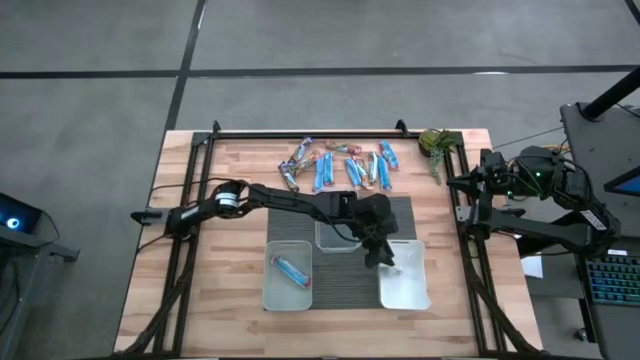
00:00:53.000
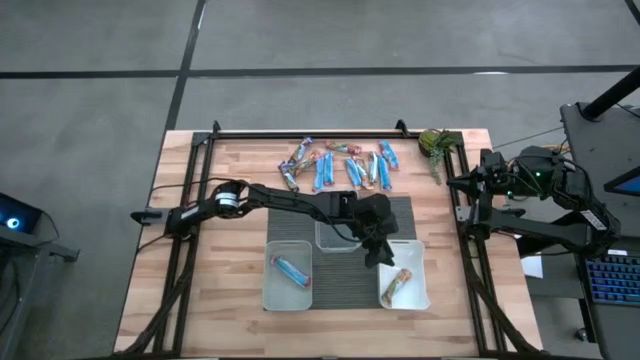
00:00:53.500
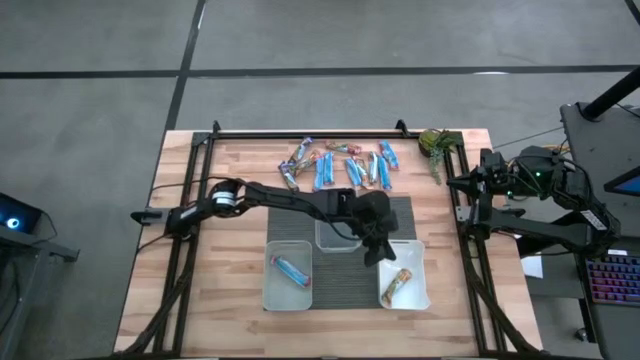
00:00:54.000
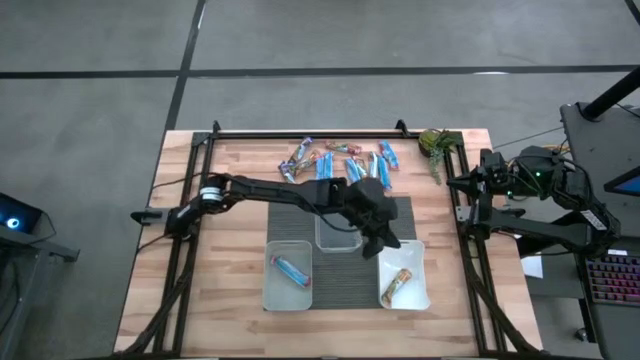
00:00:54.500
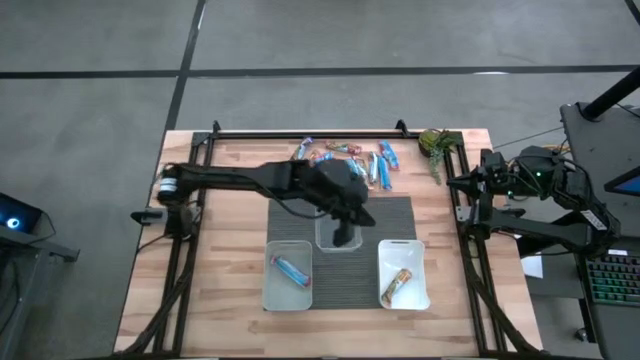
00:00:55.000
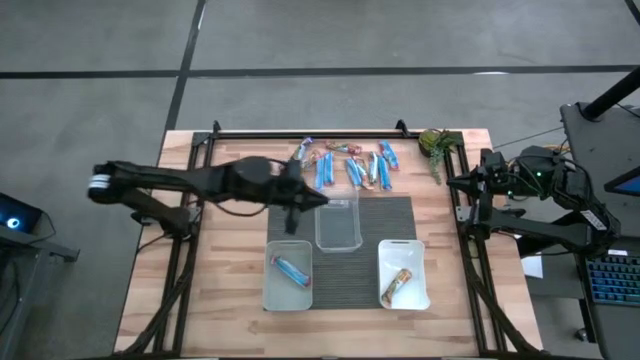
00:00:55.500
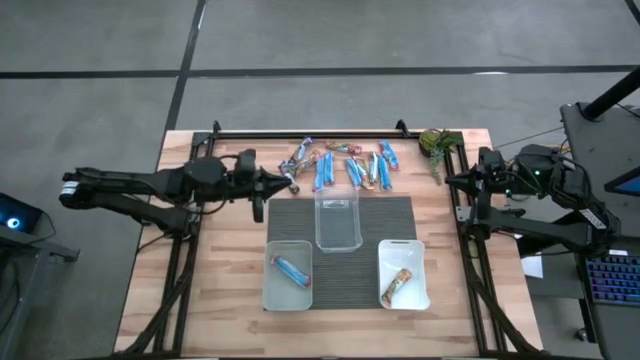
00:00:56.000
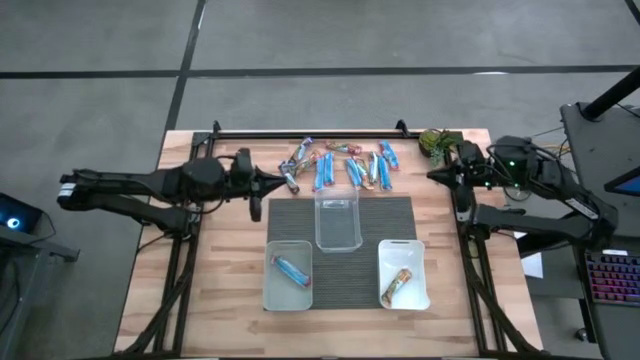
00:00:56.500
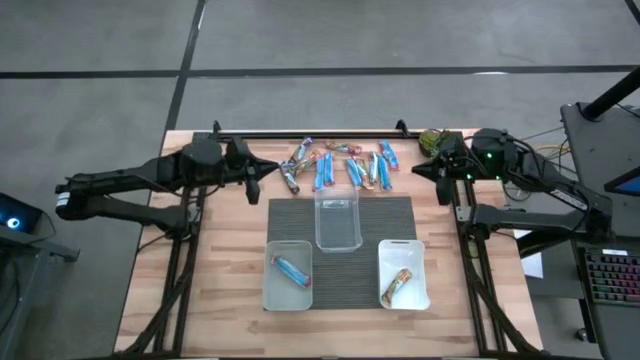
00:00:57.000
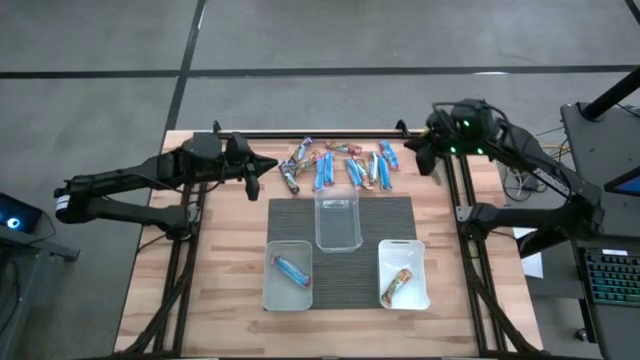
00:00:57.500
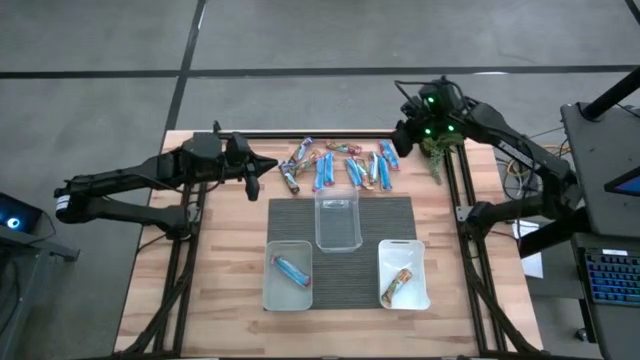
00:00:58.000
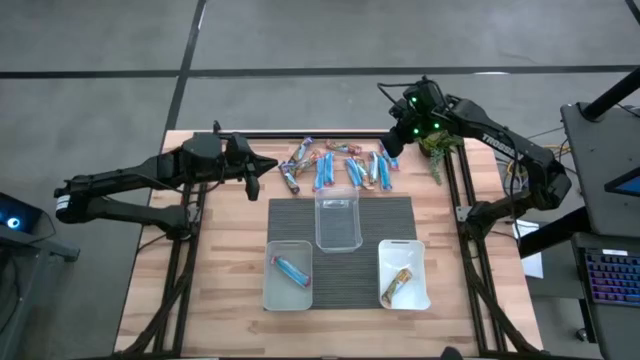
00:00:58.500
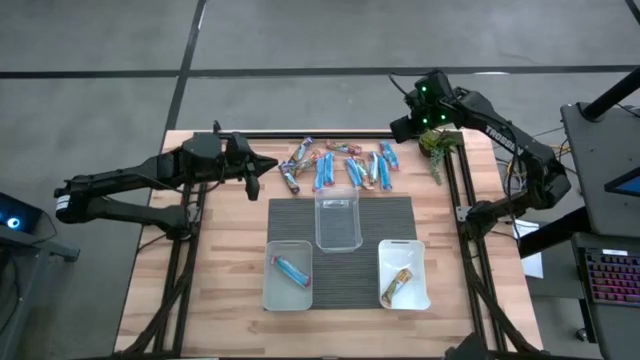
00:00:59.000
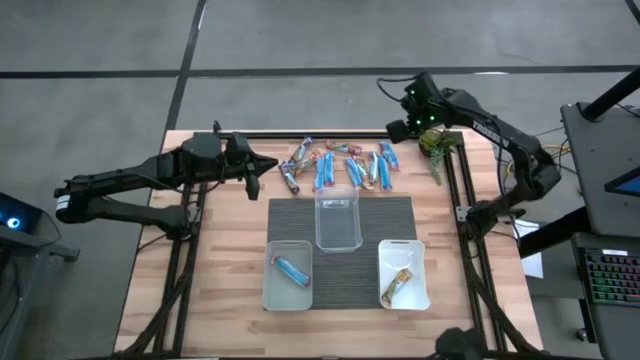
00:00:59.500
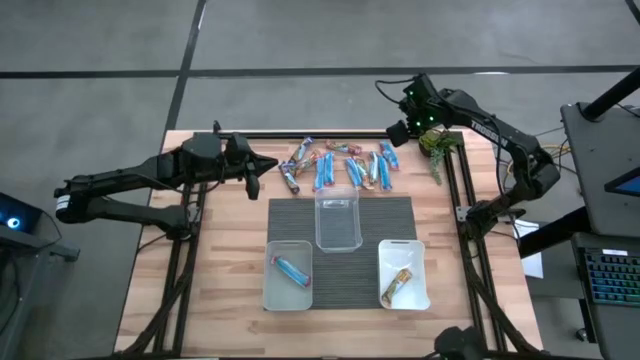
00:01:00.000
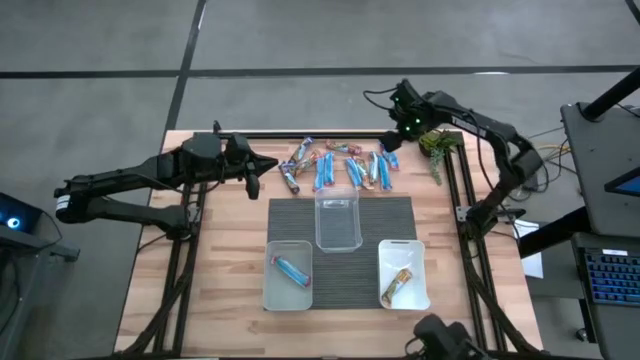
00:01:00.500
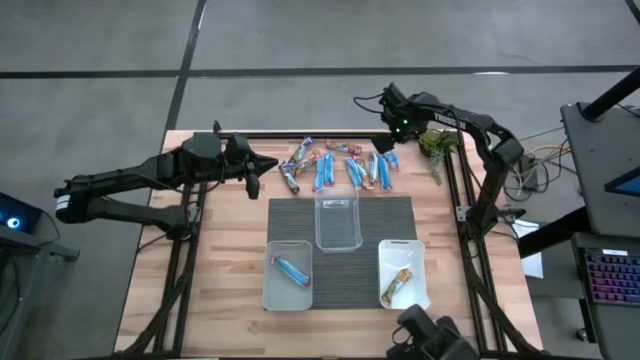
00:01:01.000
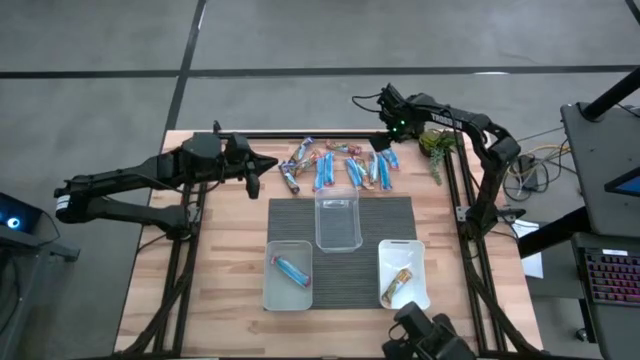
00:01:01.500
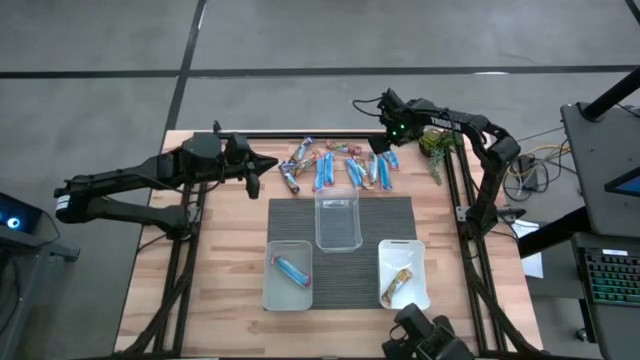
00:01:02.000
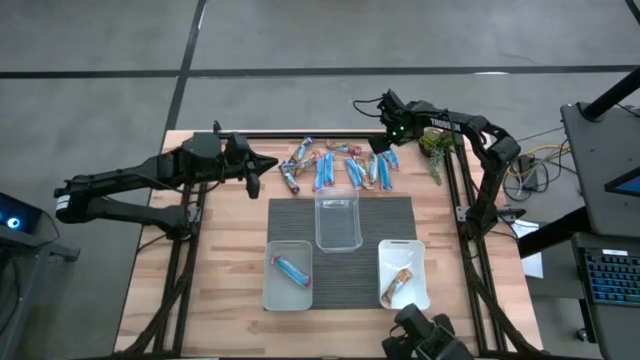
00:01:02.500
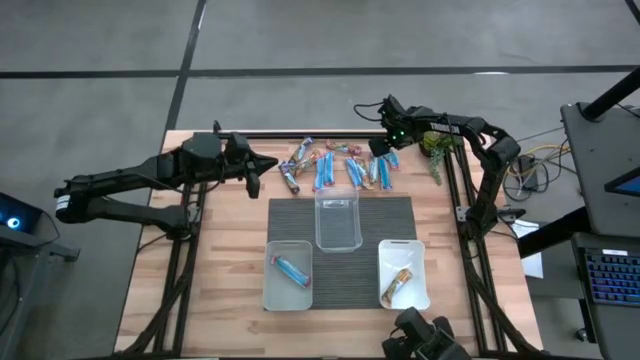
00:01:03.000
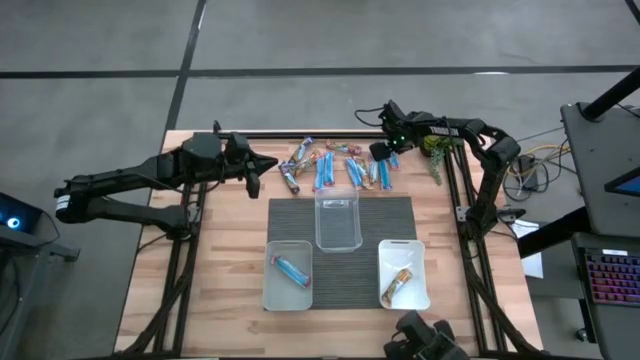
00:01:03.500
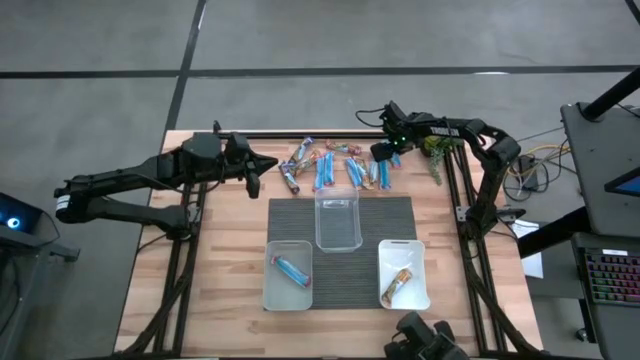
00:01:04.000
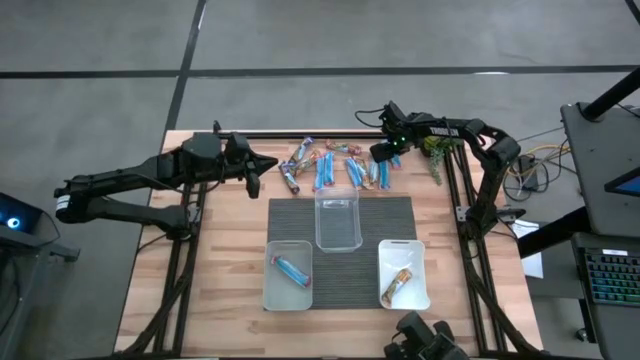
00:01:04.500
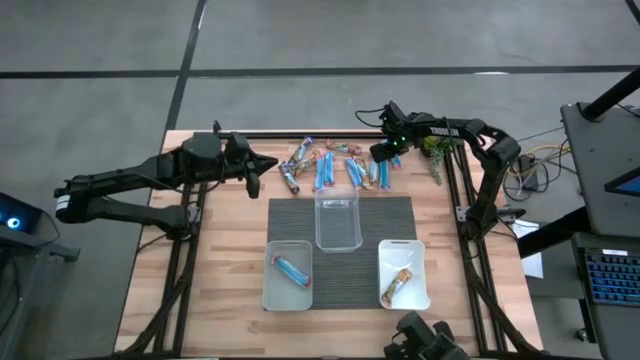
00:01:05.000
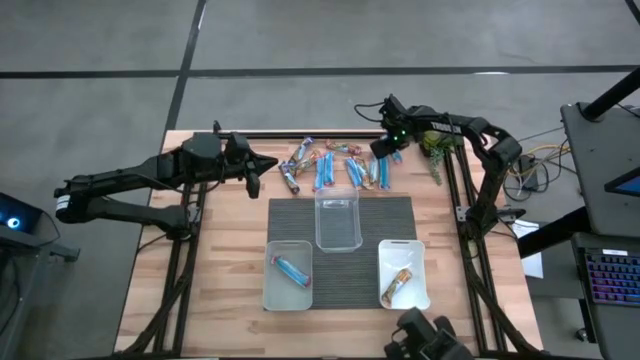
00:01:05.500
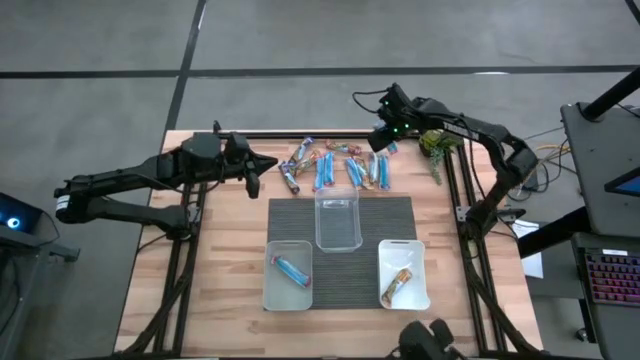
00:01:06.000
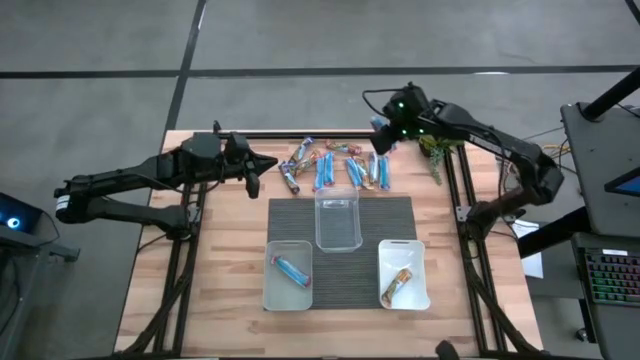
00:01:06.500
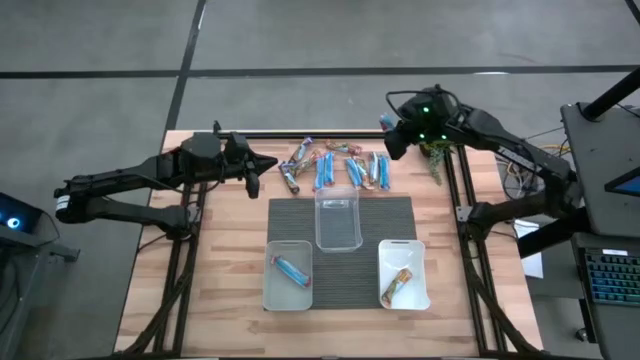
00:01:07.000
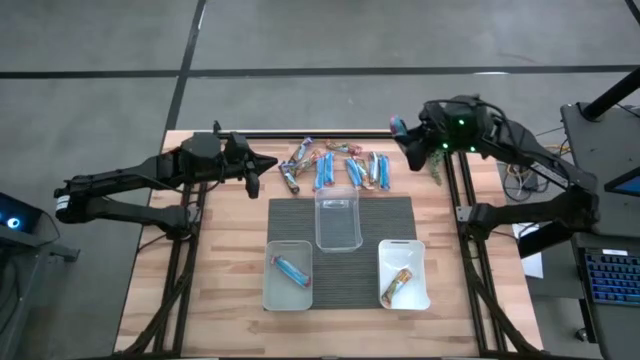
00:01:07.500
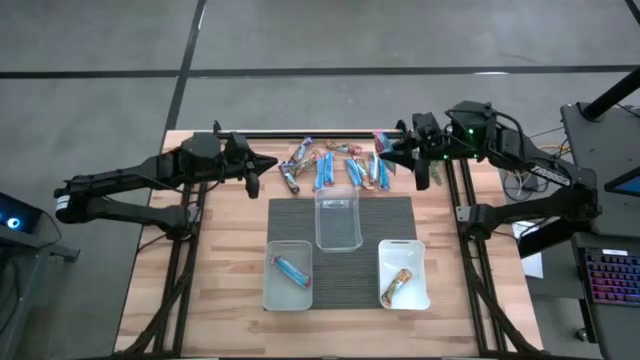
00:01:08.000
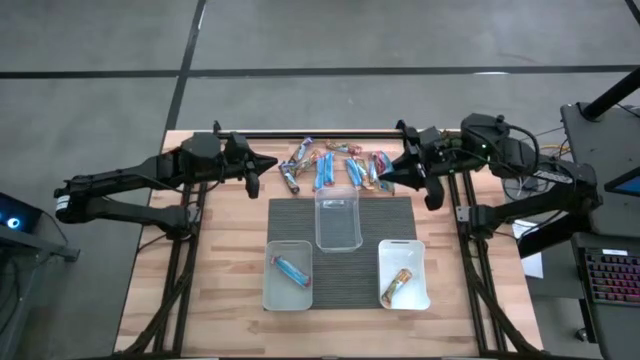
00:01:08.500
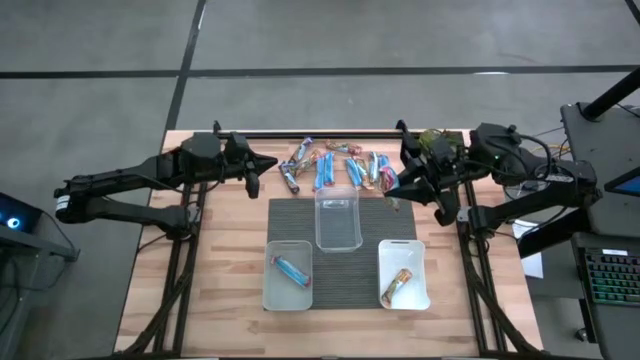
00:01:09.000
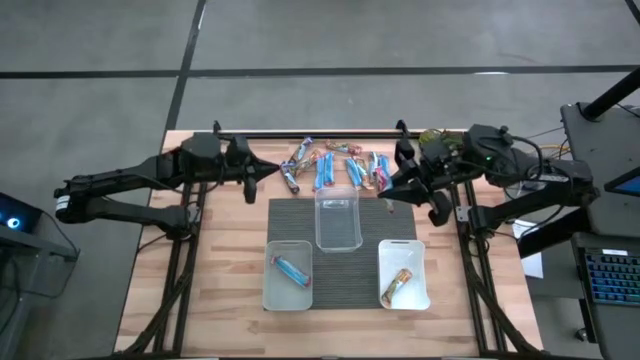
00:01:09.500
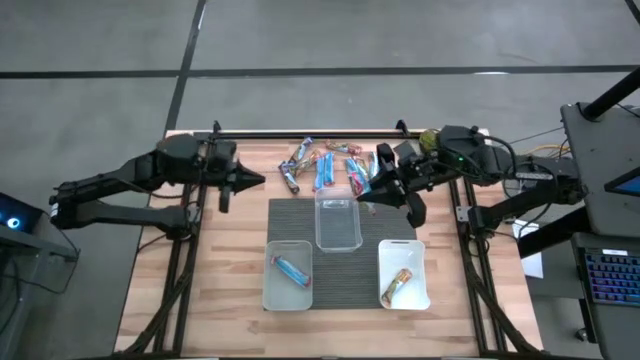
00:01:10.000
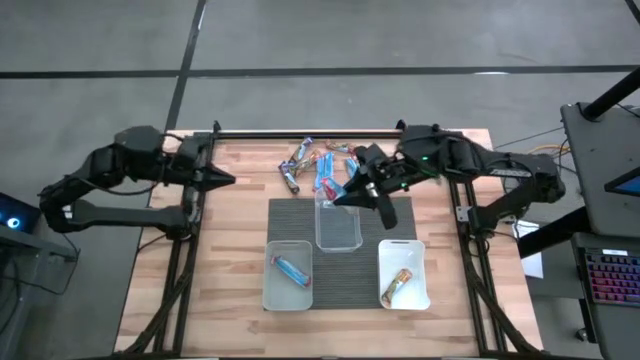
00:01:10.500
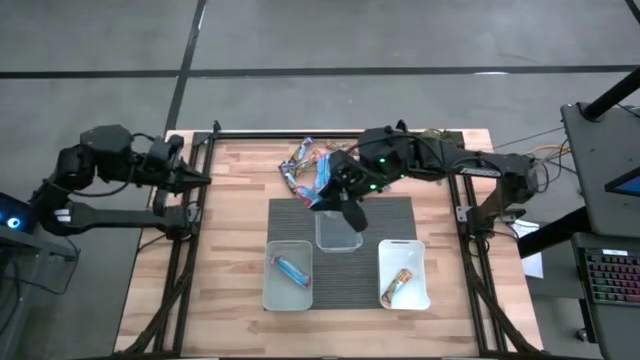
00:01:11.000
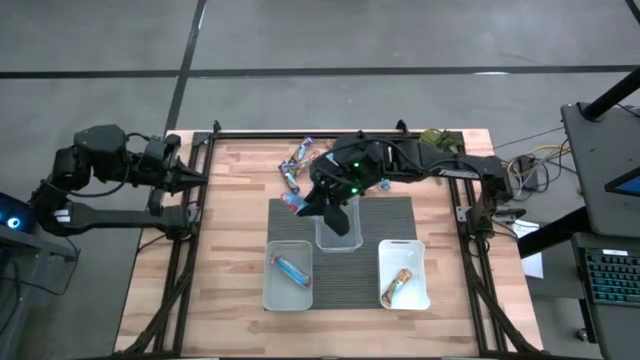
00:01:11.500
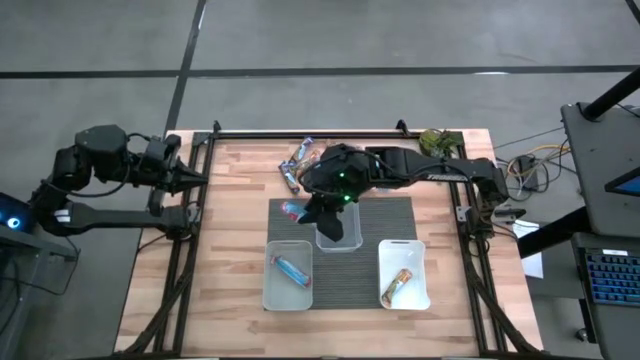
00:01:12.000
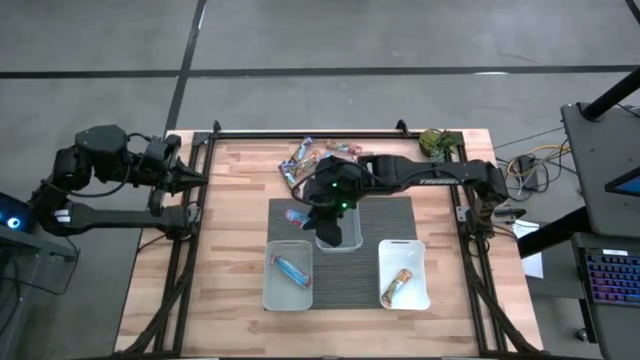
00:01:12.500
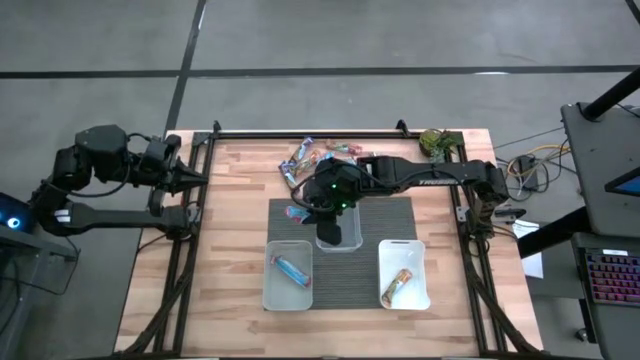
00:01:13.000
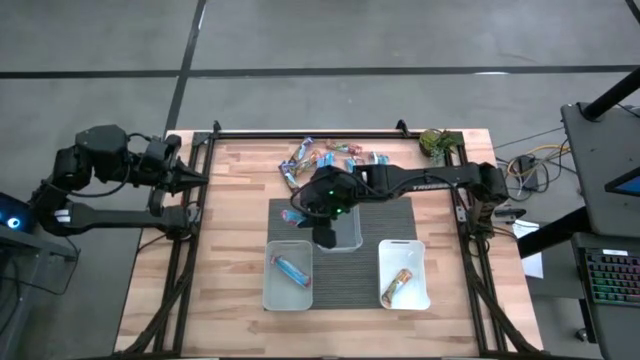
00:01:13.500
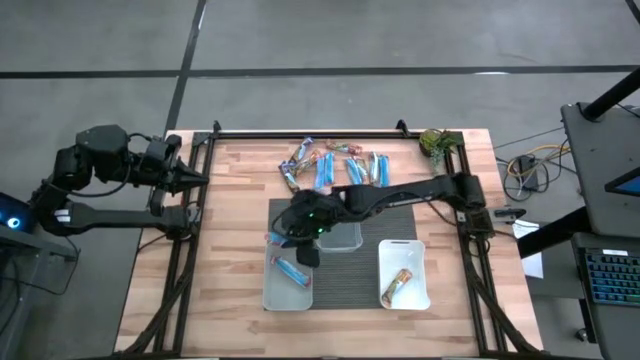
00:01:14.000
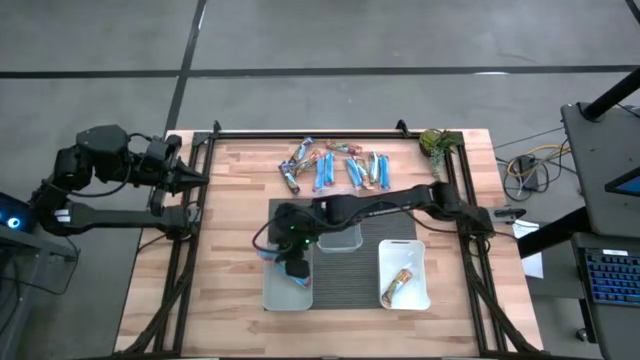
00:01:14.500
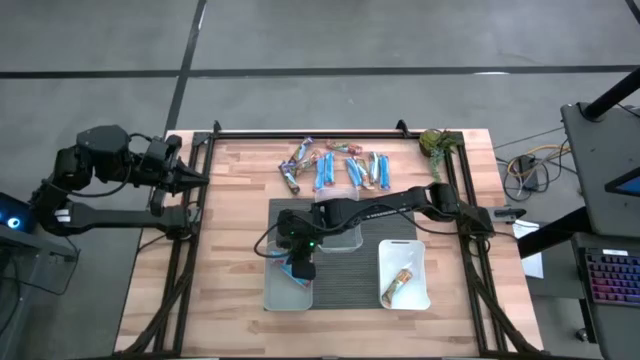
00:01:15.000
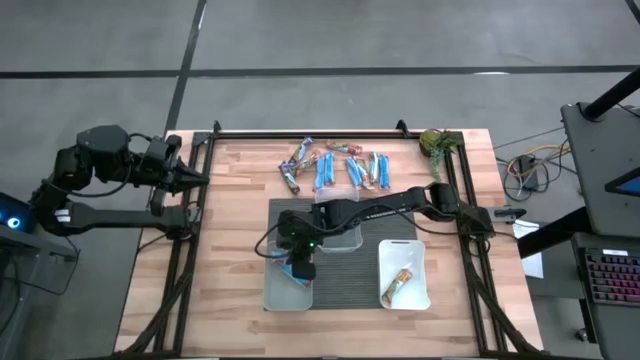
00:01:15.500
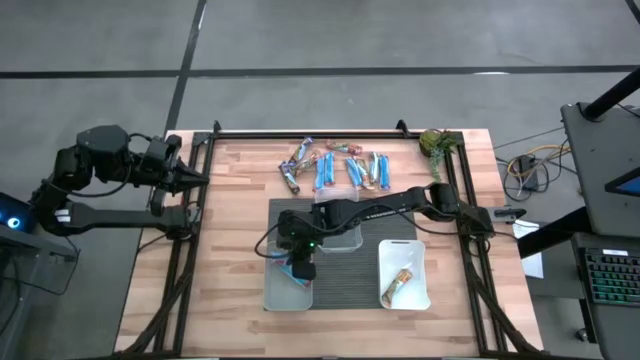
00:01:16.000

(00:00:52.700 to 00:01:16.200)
Task: Pick and place Granola Bars by type
Put the red granola bar into the gray bin
